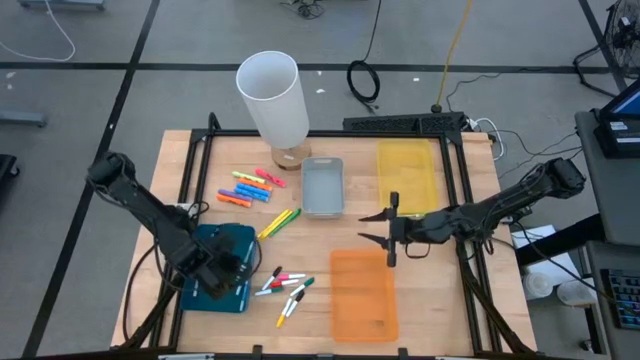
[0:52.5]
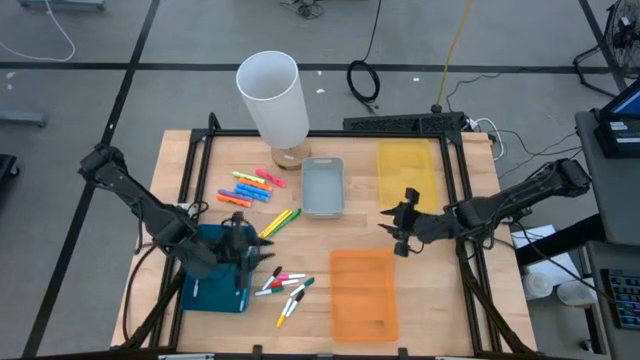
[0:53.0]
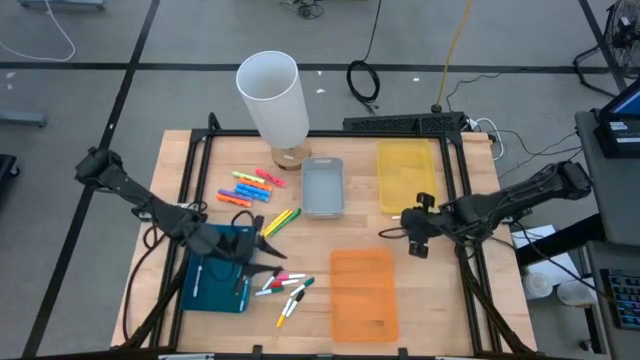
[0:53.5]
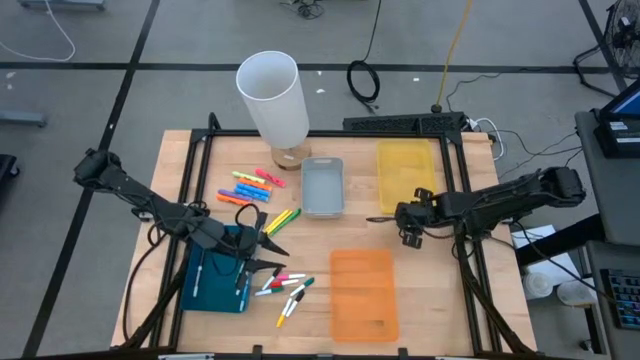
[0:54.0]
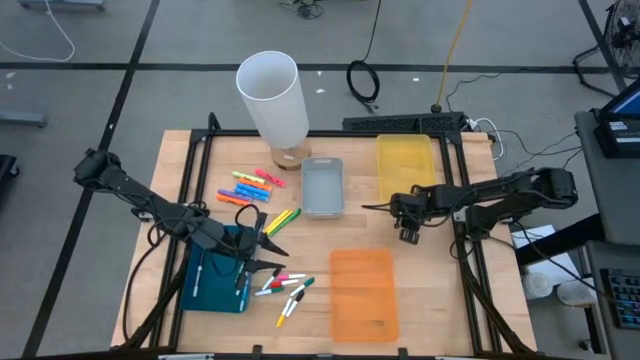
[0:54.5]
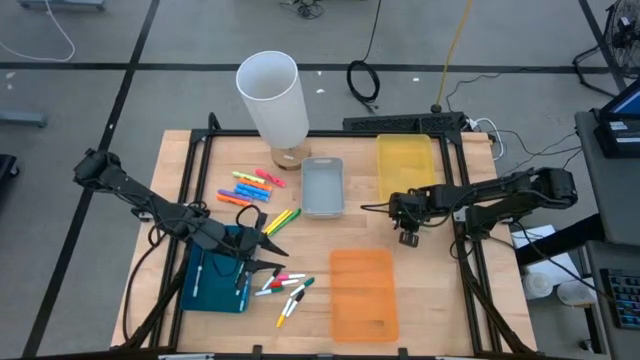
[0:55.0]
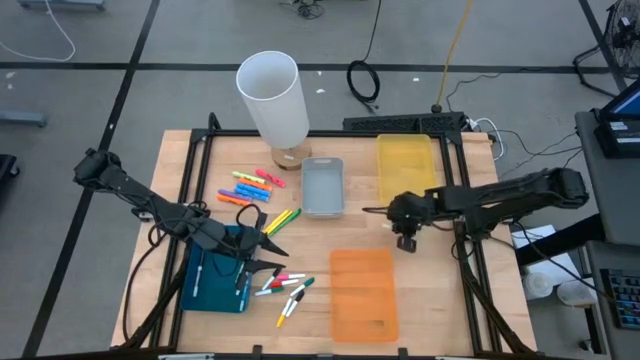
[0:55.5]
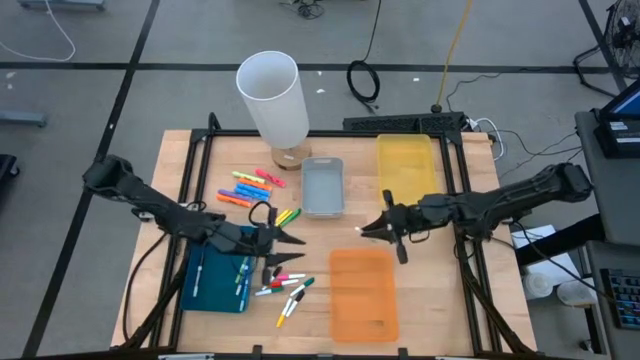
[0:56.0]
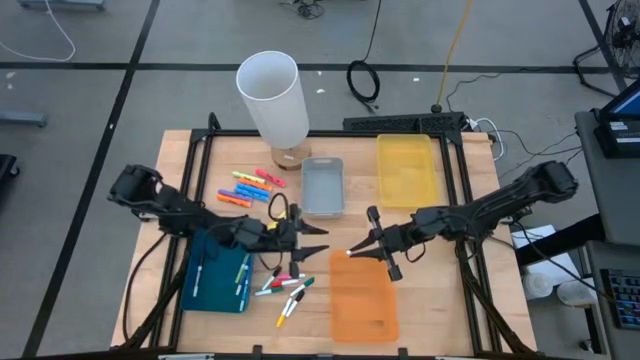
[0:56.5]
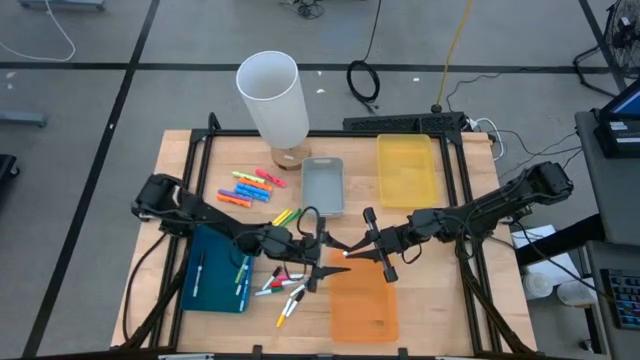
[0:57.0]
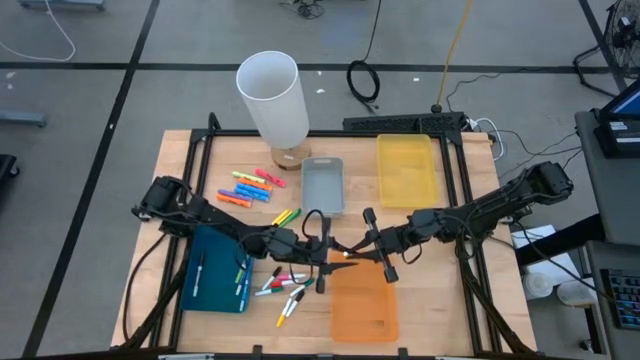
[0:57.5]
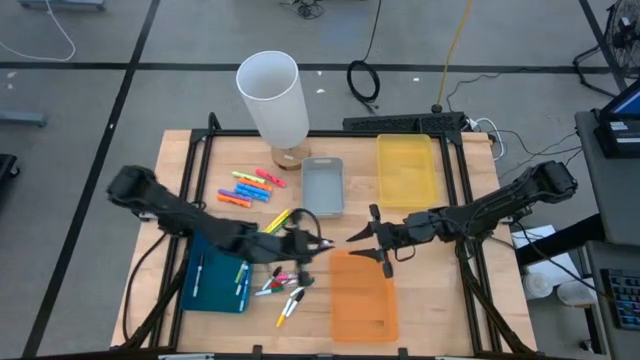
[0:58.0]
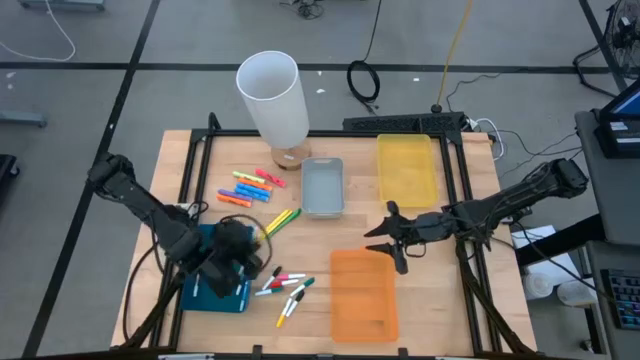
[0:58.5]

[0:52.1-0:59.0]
Task: Pick & Place Markers
Put the green marker pen into the blue bin

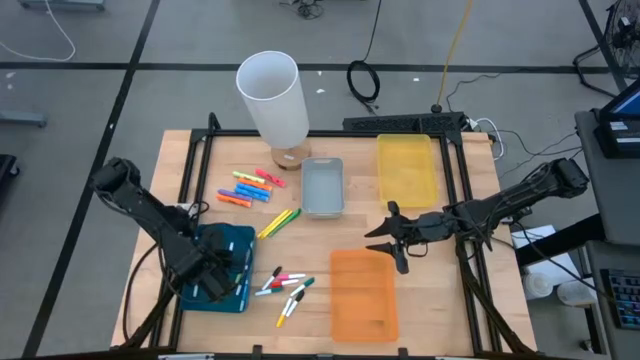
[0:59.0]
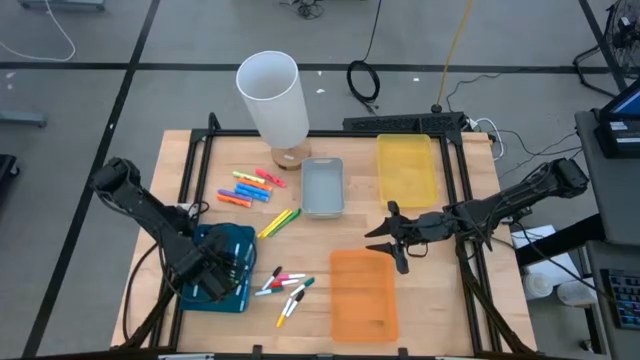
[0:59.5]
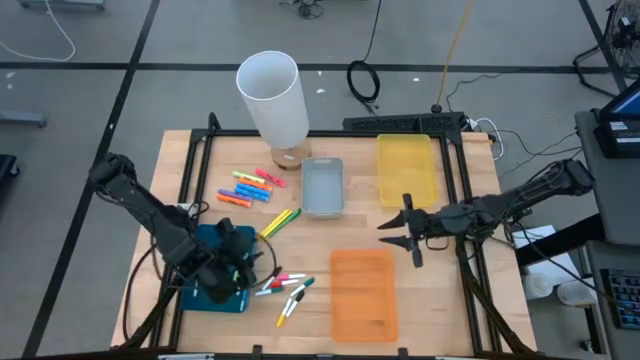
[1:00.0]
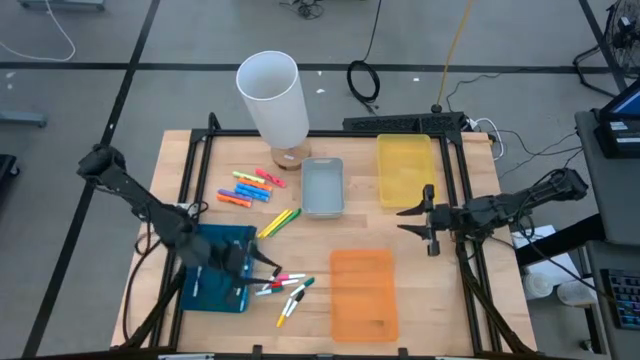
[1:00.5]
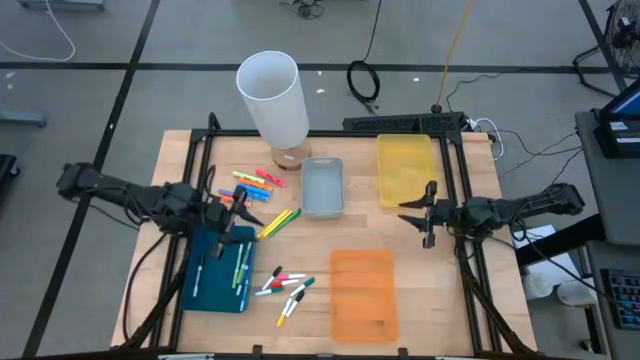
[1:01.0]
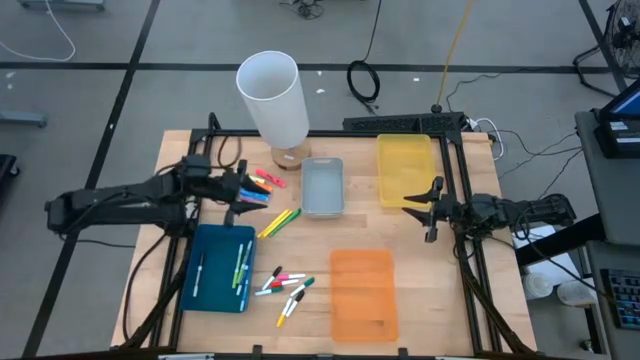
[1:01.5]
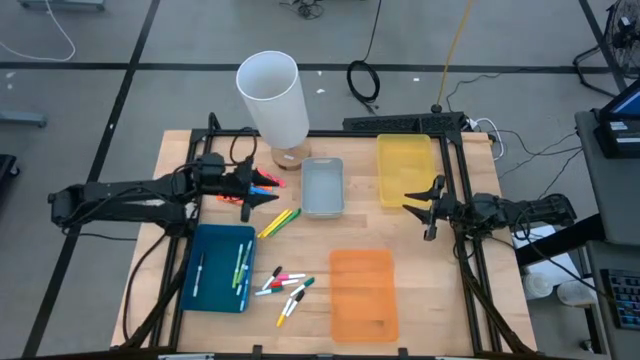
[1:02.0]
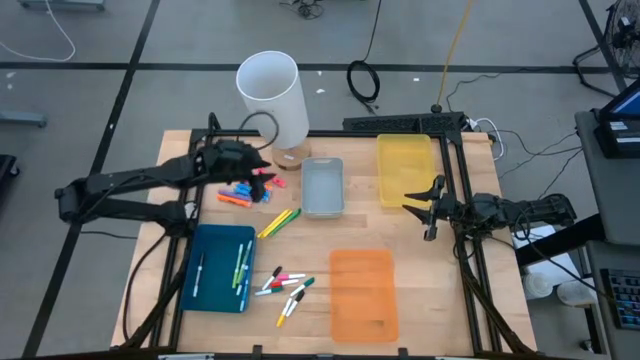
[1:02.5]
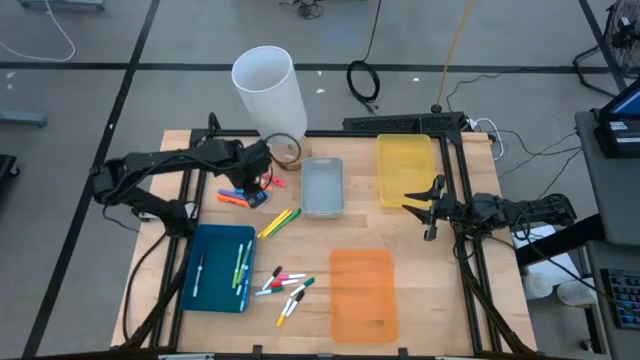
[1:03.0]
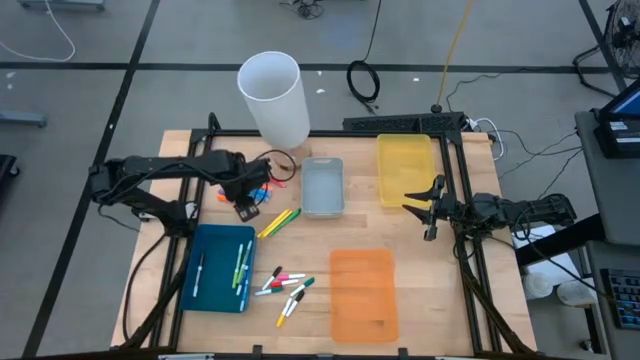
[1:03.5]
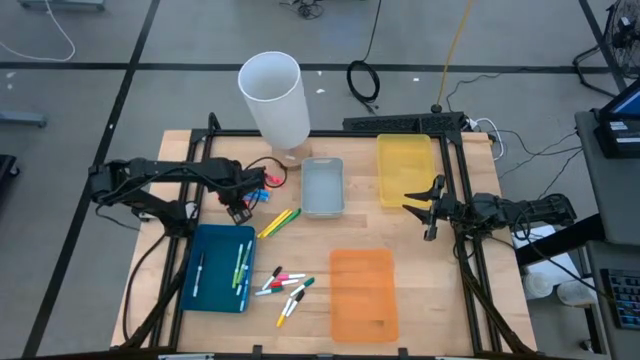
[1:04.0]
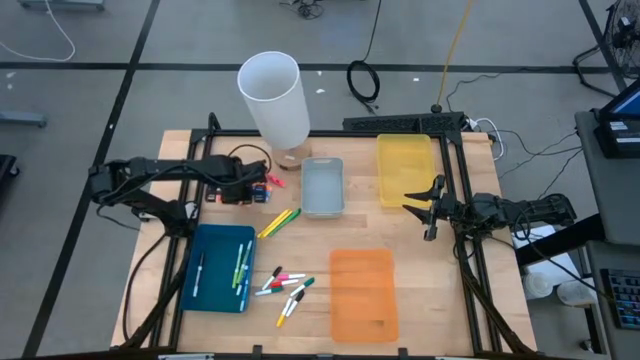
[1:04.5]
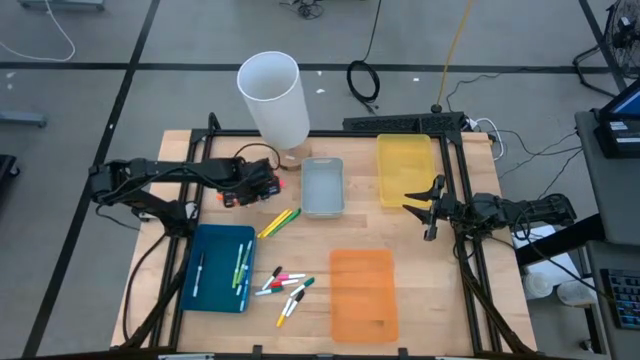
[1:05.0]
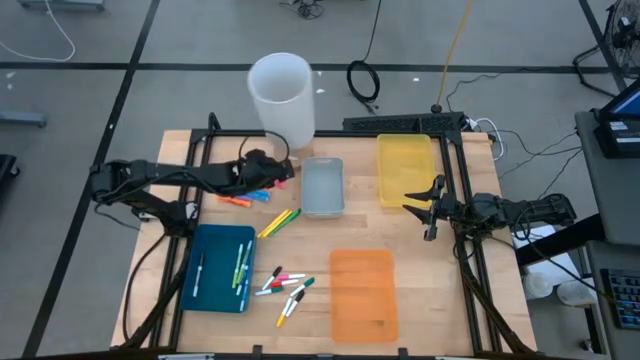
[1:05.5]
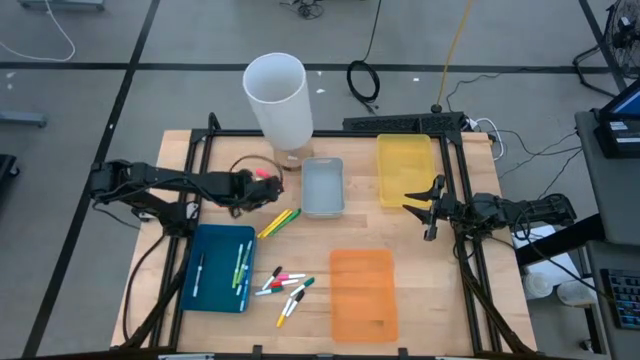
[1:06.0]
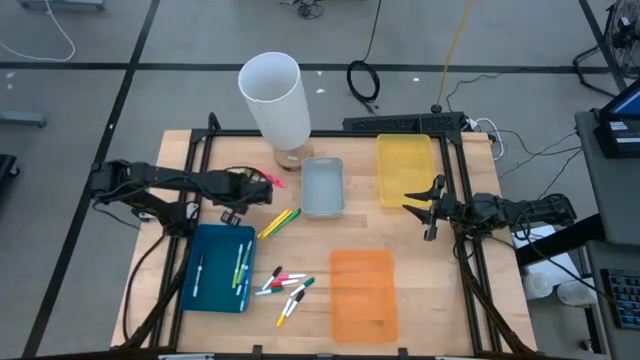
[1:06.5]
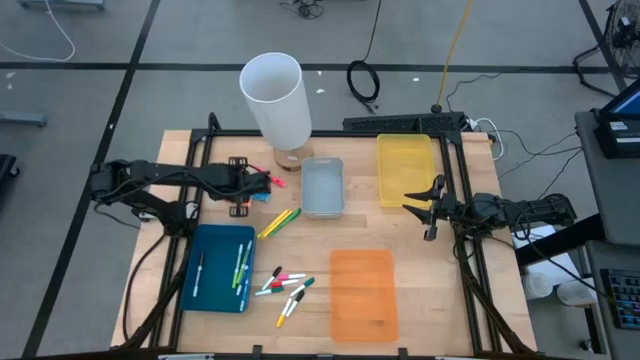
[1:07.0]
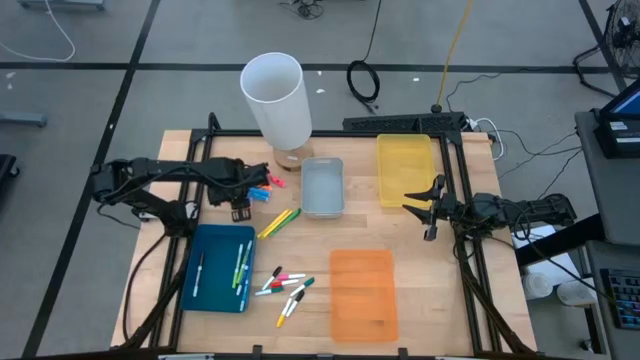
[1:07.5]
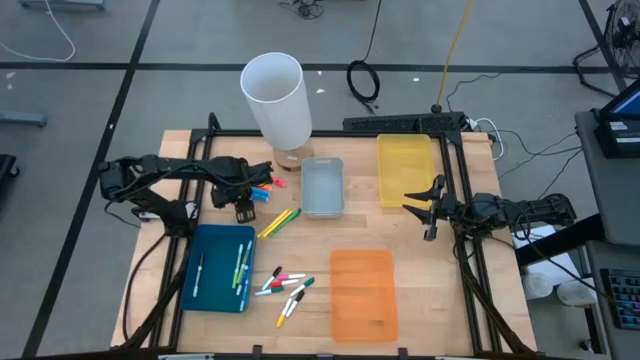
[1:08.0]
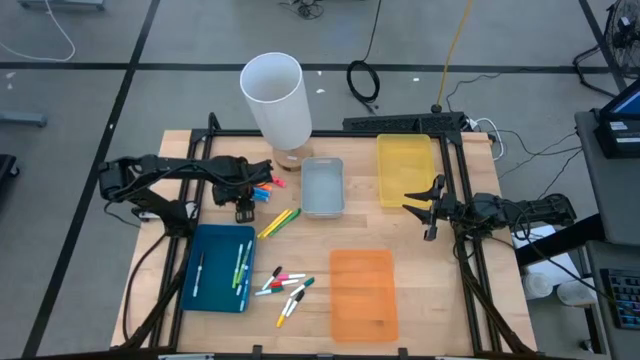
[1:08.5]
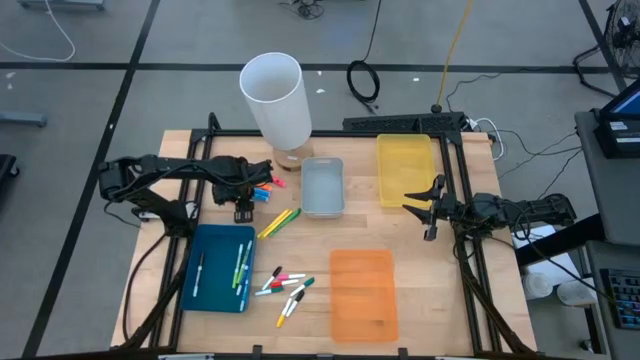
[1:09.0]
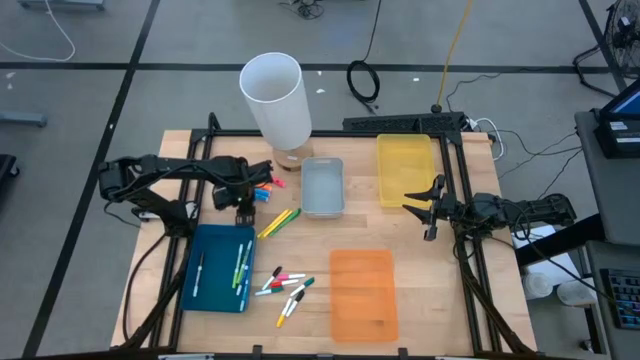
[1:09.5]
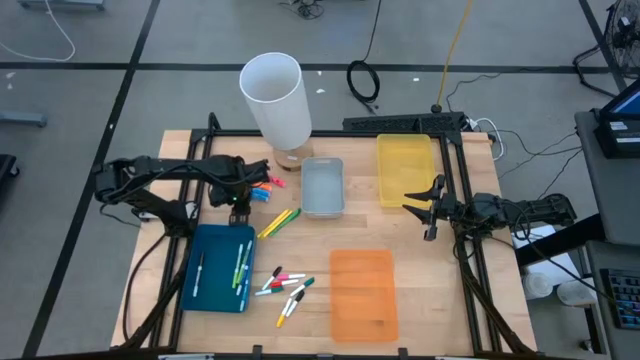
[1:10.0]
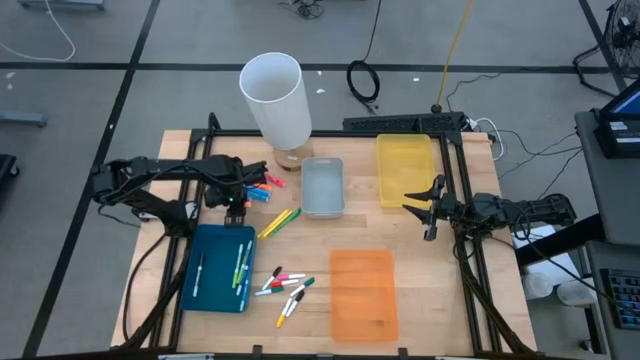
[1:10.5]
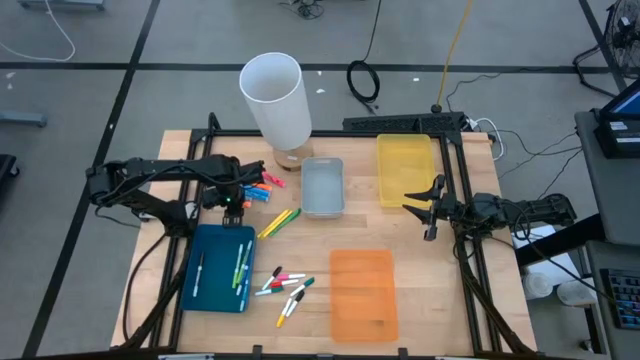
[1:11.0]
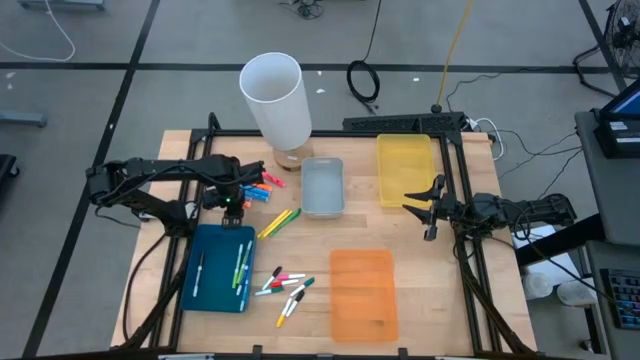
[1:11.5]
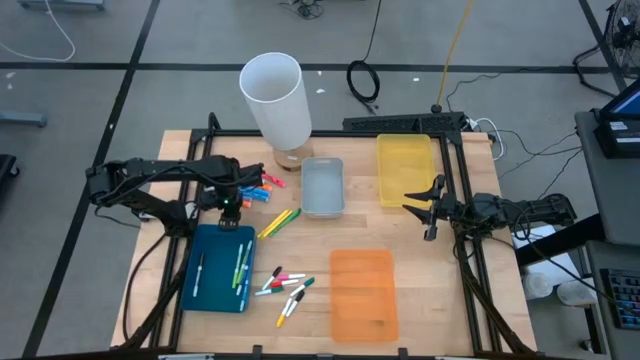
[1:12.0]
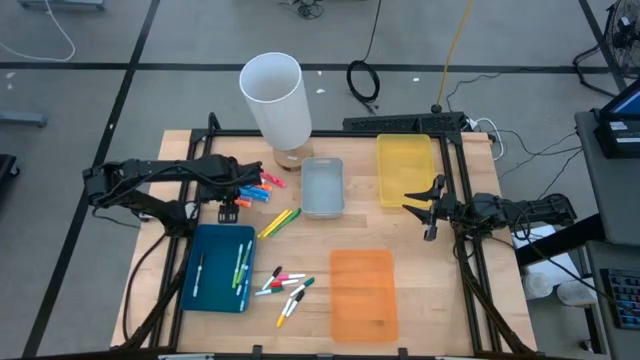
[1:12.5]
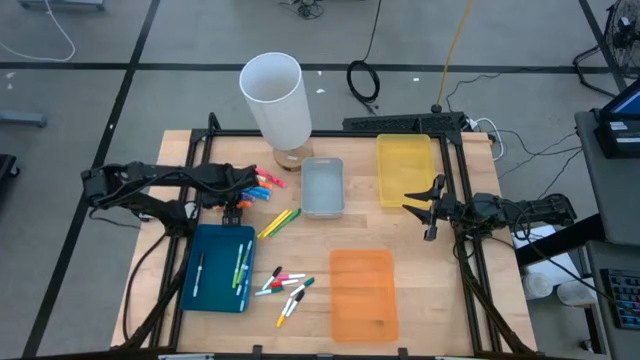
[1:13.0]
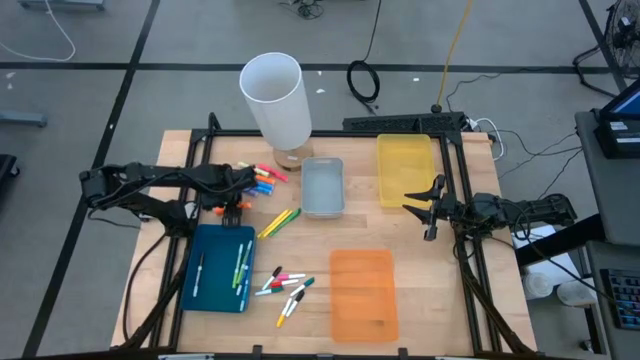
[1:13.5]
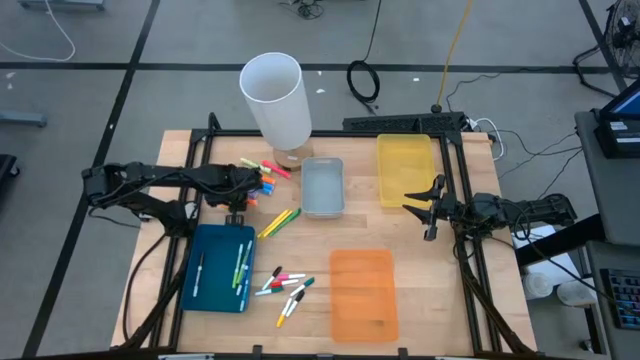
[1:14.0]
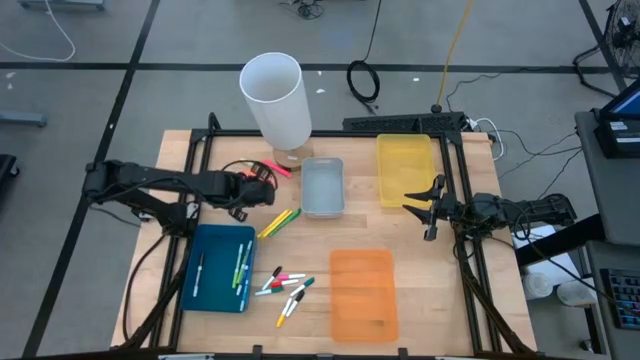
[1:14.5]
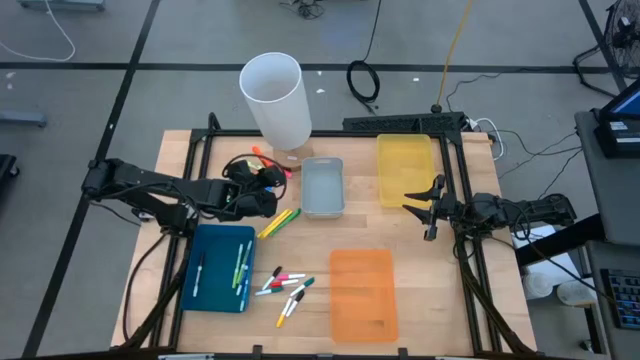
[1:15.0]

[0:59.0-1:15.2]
Put the bottom large orange highlighter pen in the yellow bin
